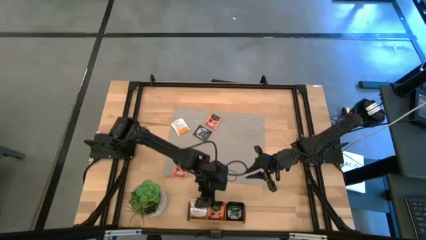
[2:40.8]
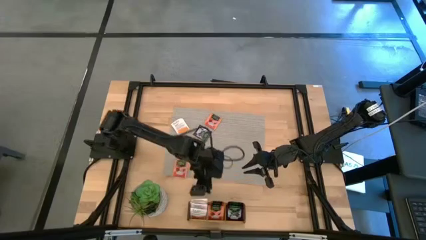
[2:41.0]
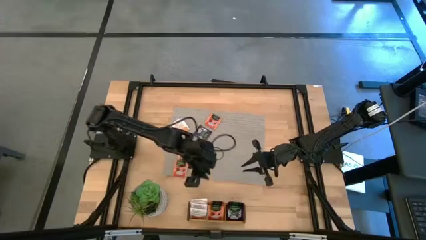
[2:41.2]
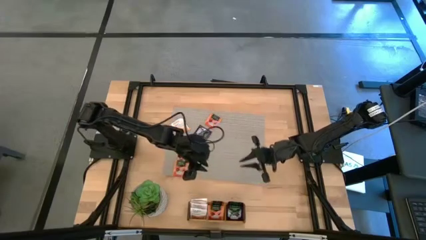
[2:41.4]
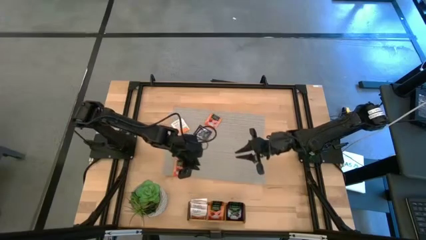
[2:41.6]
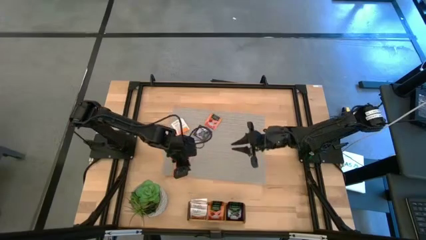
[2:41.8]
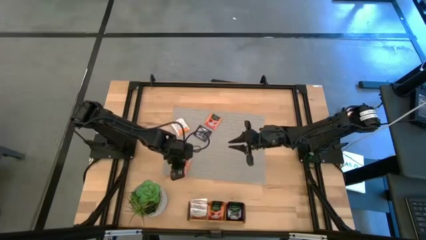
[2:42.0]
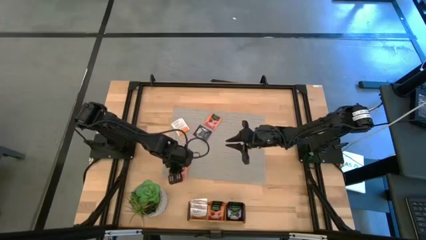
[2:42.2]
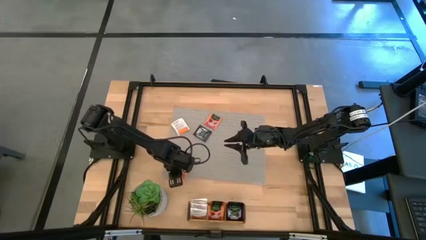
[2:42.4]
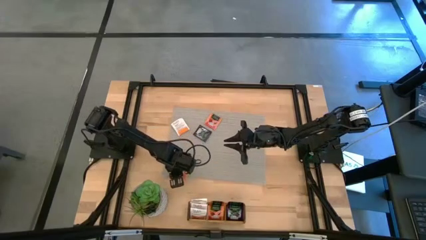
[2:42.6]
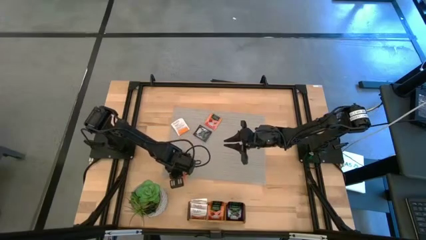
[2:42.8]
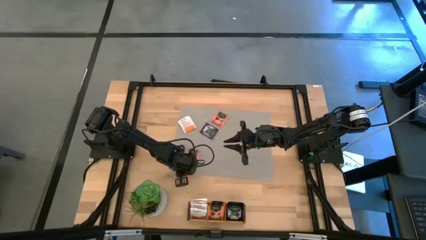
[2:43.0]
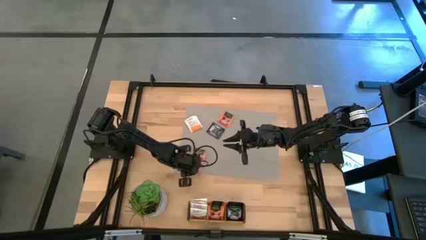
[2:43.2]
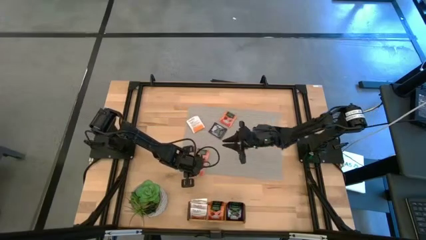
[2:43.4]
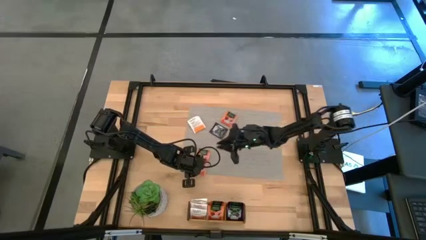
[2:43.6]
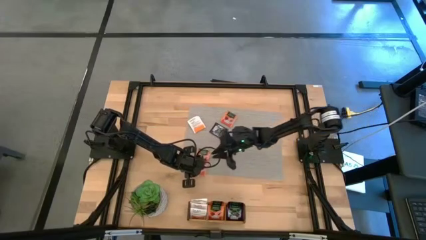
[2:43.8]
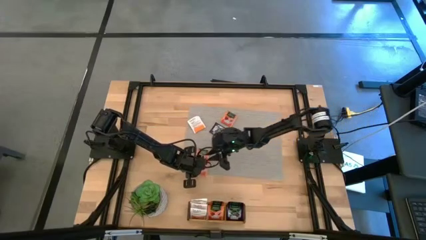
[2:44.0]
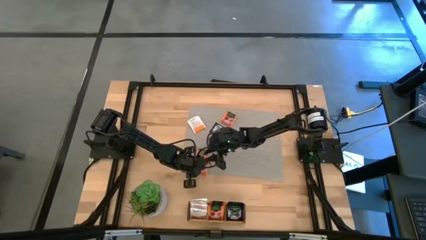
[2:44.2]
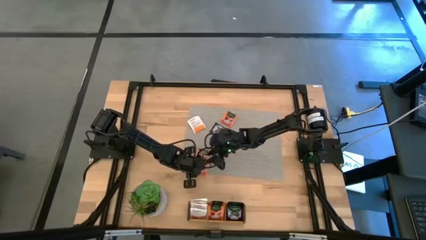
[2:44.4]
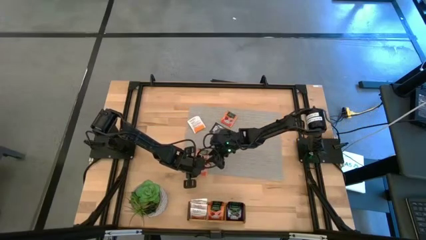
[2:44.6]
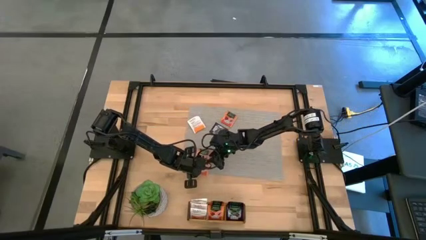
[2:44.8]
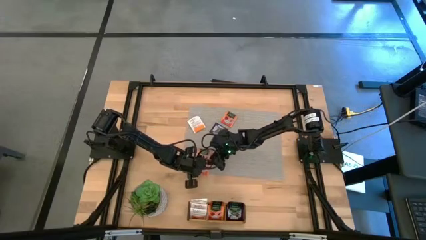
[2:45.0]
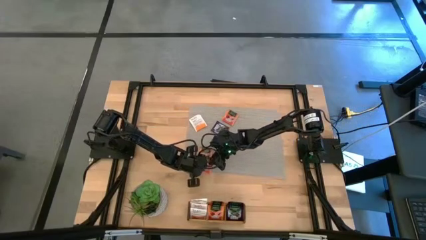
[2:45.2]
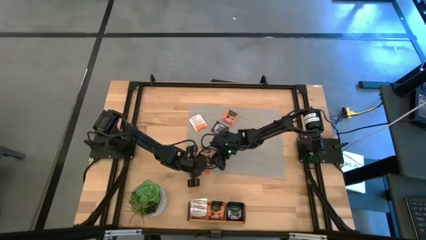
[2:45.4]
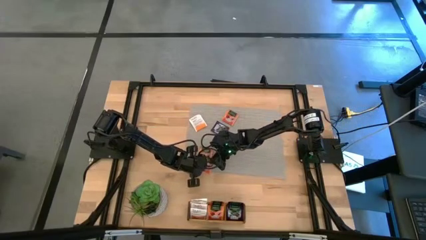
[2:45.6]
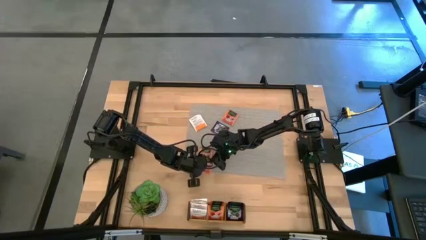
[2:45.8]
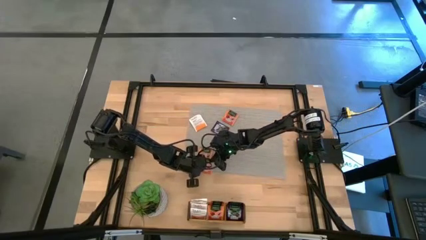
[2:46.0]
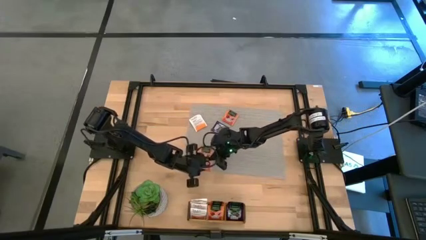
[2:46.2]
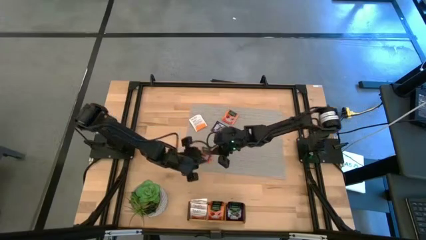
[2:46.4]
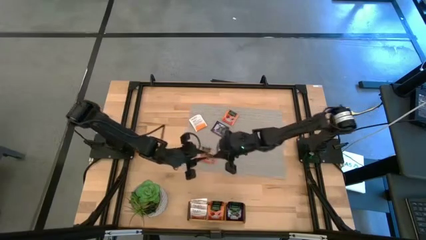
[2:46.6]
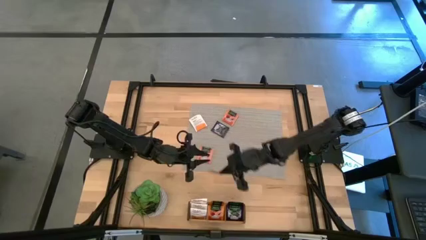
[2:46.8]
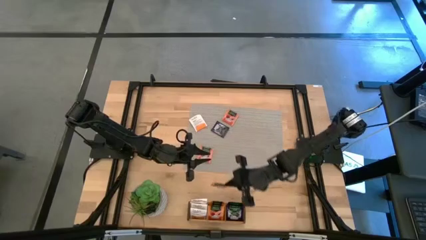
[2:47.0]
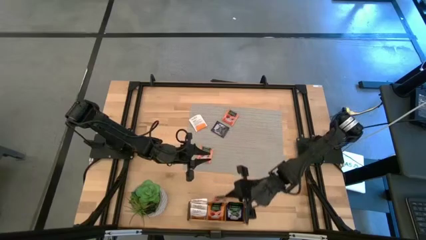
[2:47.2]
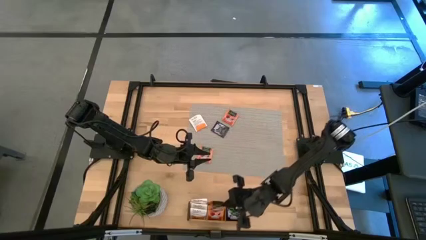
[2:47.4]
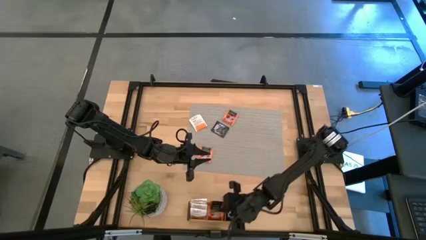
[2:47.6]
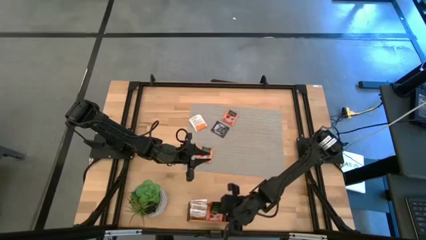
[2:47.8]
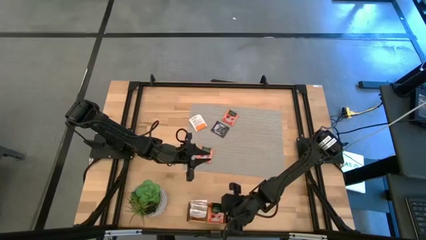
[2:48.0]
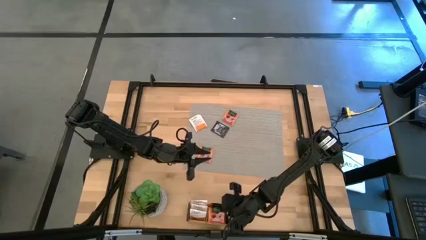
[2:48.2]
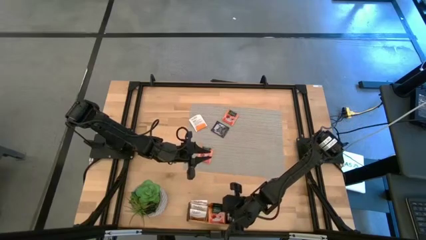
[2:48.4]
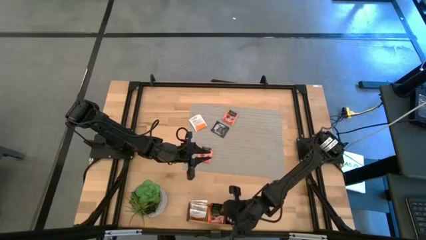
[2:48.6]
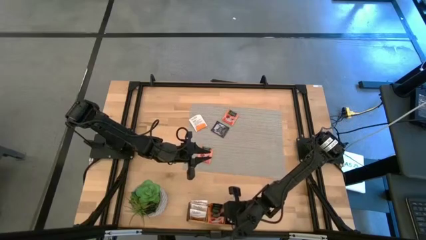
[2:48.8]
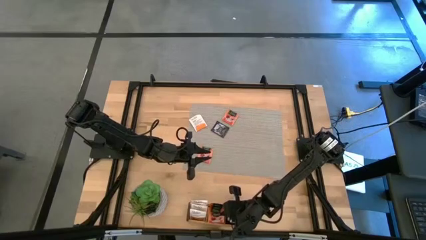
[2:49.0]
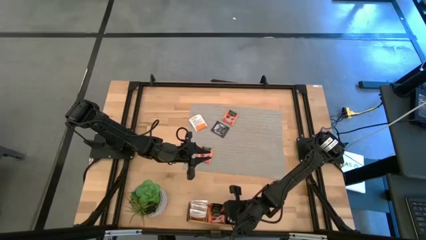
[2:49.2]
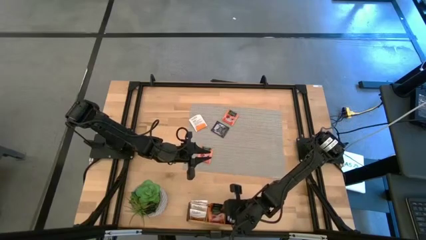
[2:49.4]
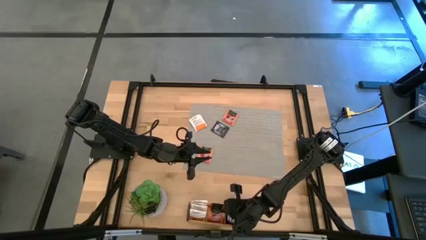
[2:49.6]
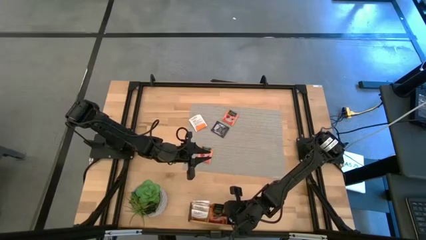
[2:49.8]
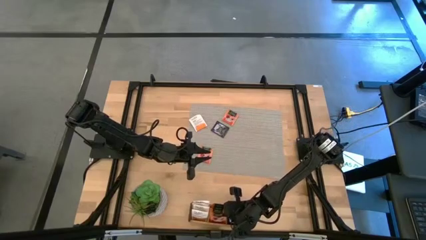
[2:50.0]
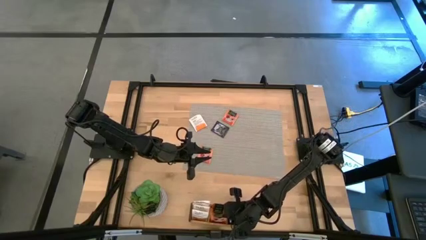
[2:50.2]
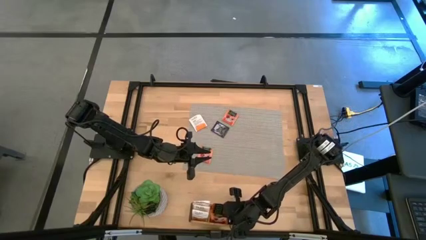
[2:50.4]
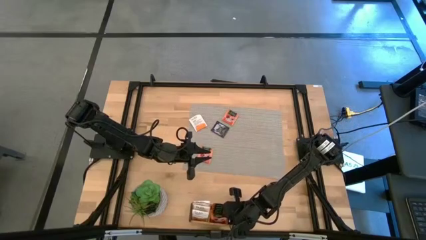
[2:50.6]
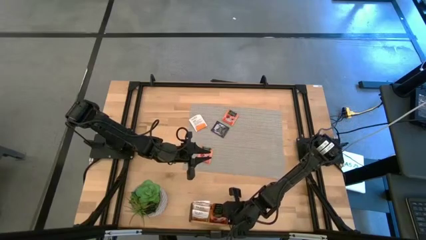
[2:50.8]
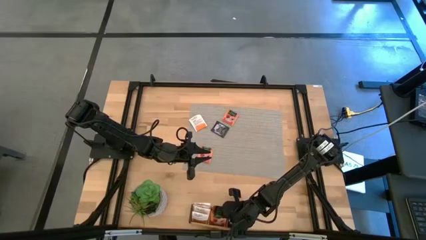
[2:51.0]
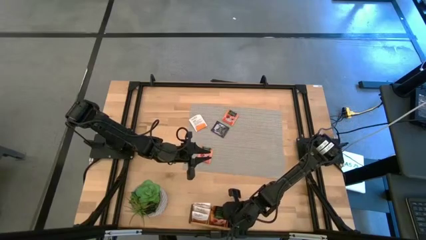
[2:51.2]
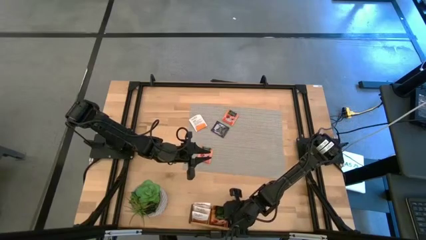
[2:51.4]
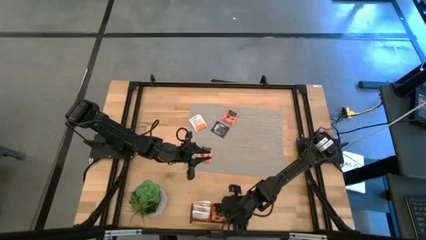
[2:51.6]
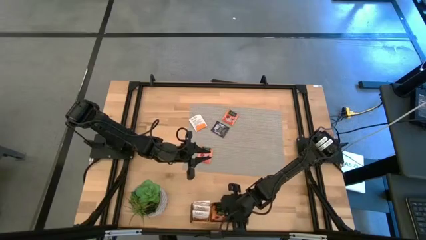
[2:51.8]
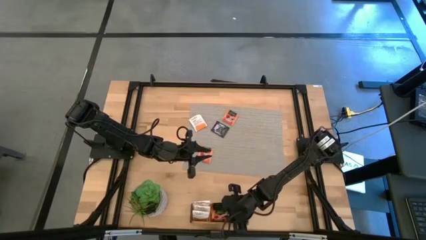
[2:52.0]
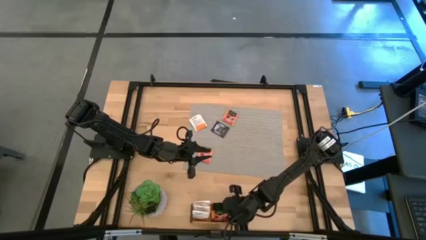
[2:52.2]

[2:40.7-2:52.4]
Task: Pick & Place Tea
Put the orange tea bag into the middle section of the wooden organizer
